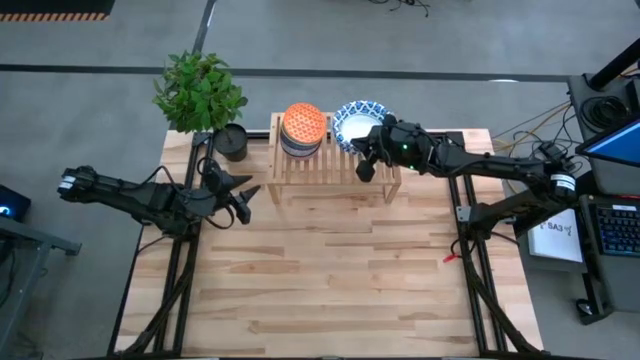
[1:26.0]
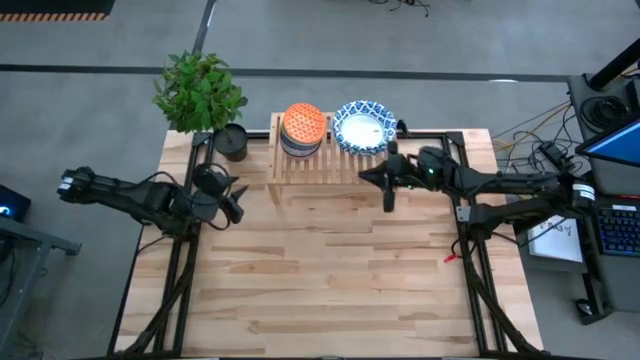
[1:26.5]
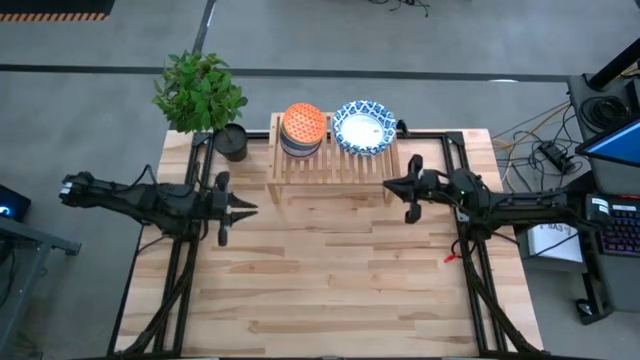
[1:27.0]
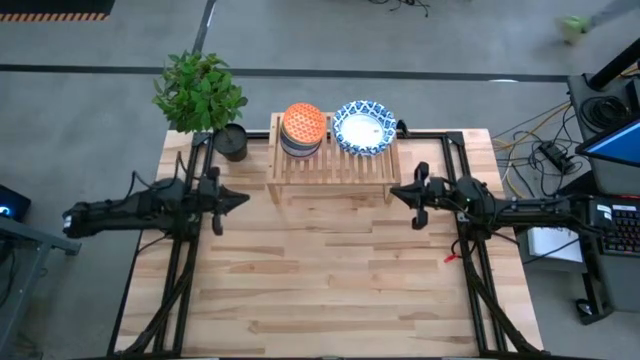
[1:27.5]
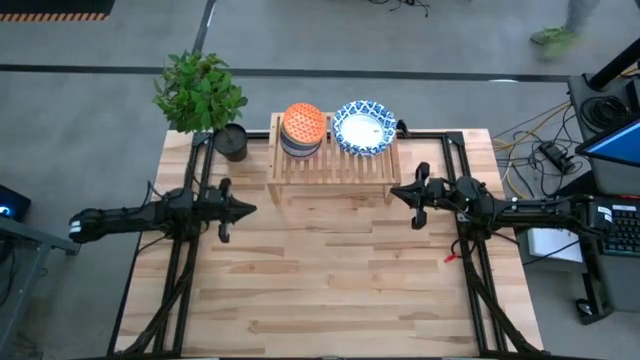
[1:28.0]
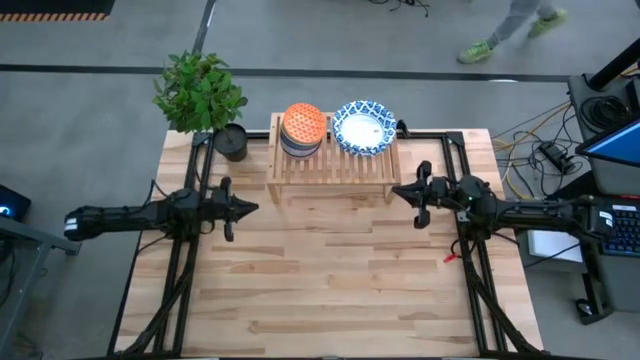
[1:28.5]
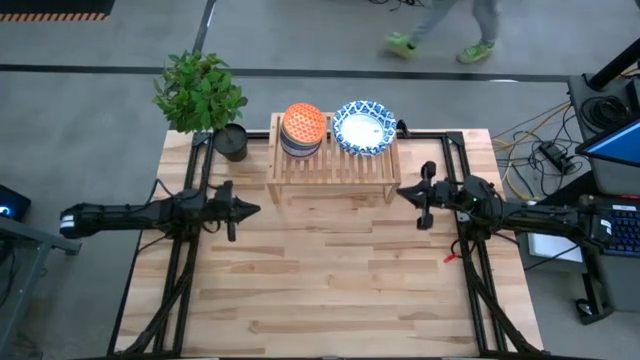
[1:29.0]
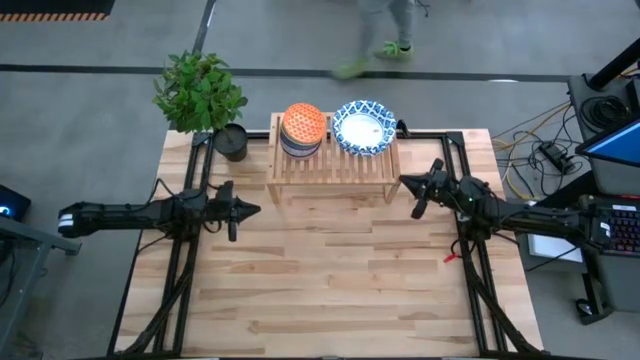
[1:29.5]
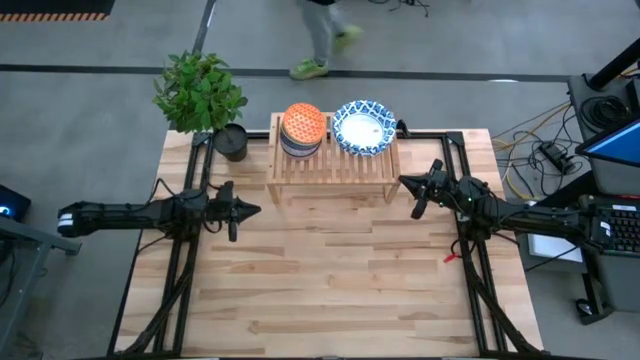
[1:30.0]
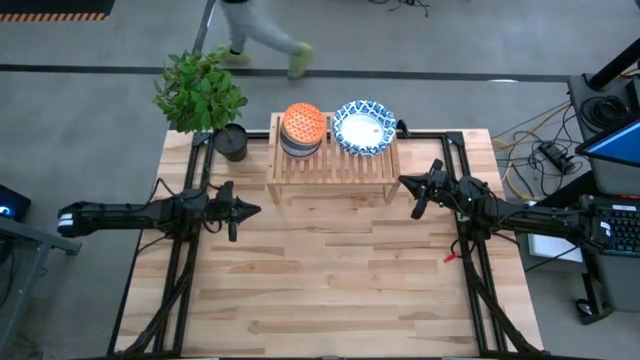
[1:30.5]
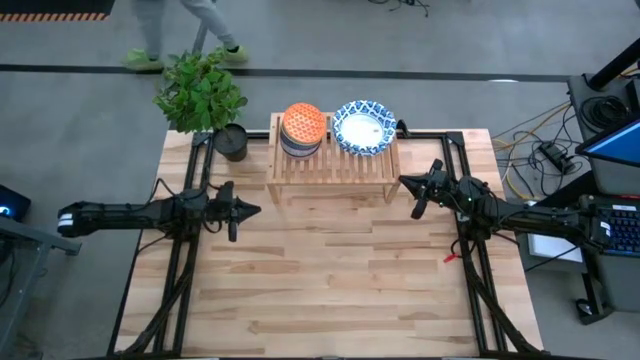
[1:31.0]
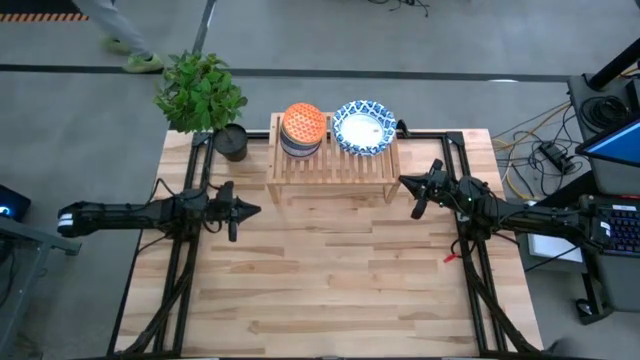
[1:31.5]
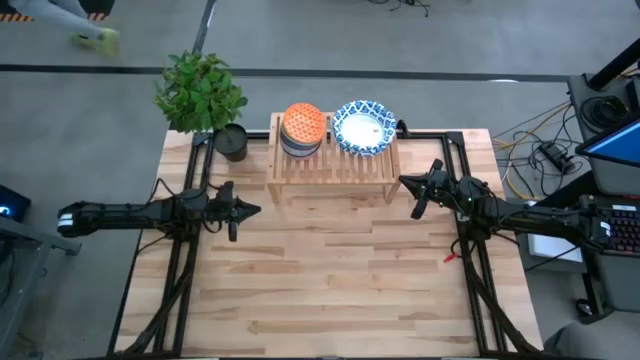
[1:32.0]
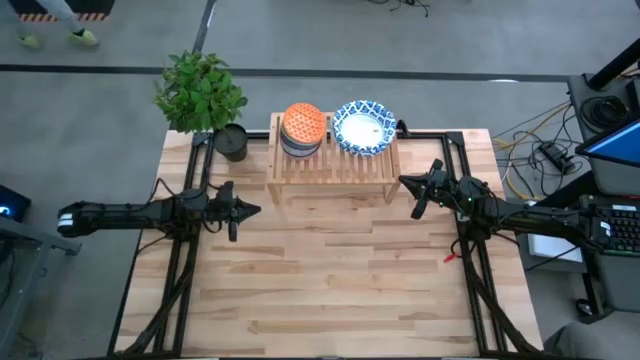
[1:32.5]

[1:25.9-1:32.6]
Task: Place and stack bowls onto a shelf
Return to Home Position

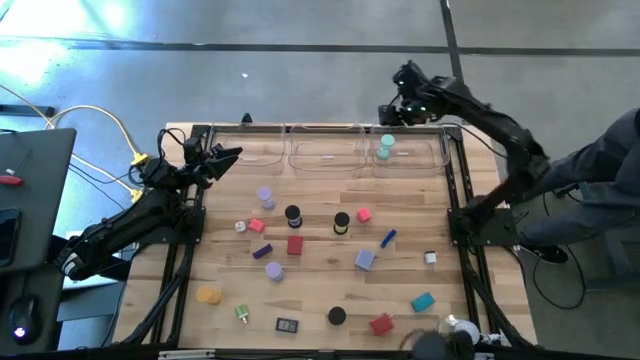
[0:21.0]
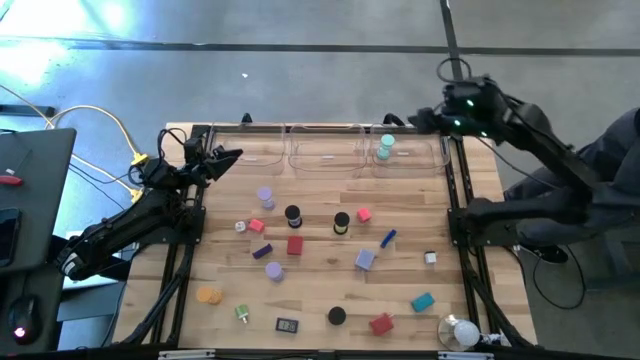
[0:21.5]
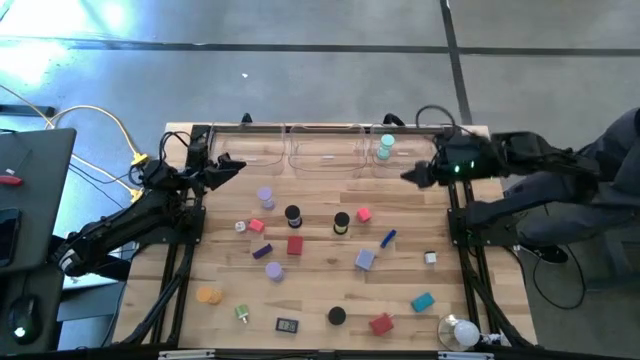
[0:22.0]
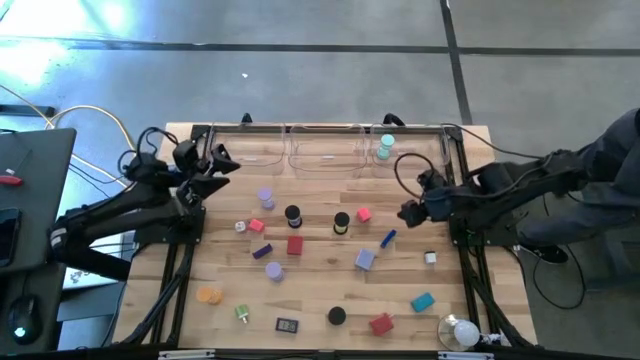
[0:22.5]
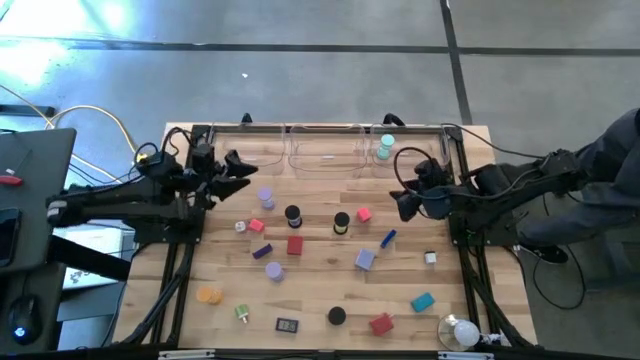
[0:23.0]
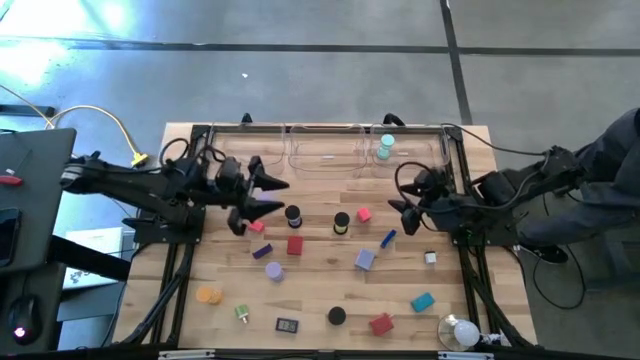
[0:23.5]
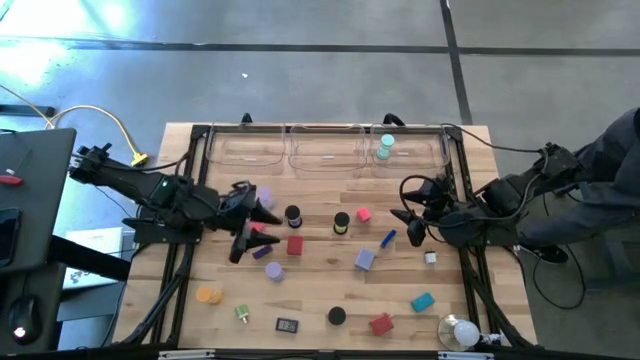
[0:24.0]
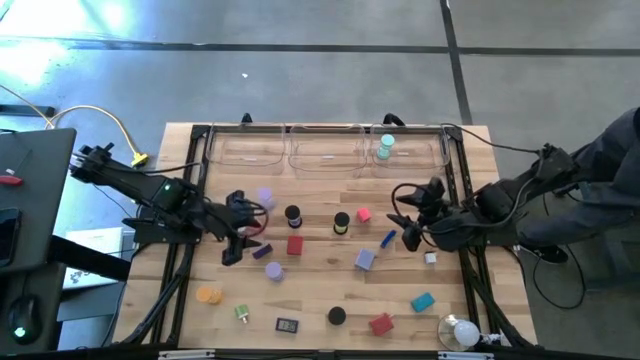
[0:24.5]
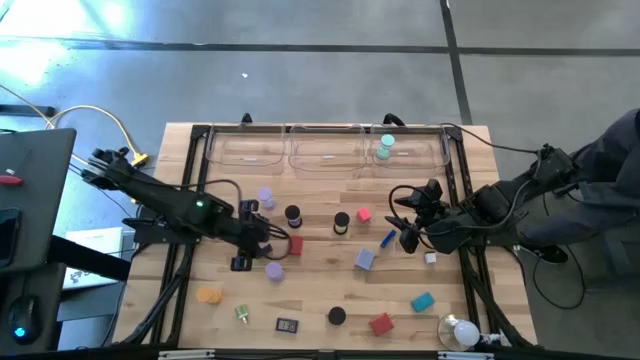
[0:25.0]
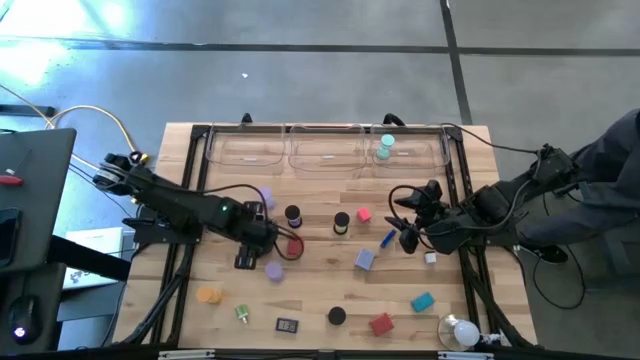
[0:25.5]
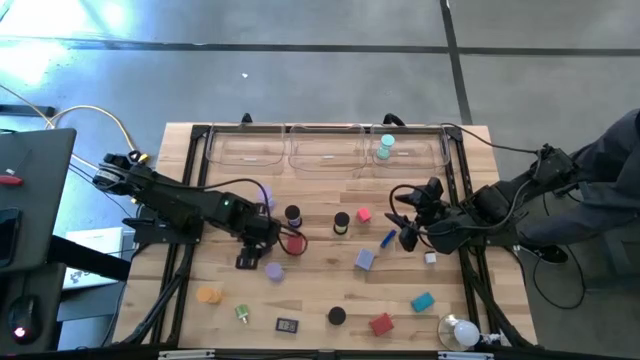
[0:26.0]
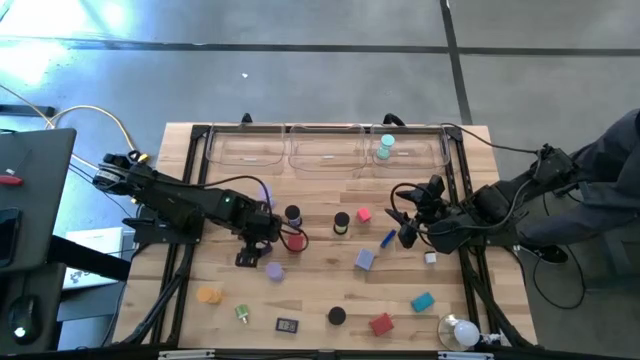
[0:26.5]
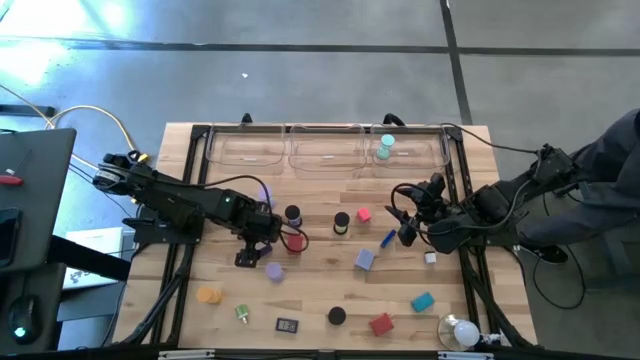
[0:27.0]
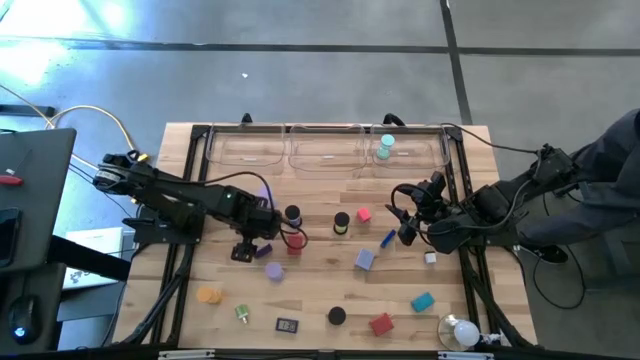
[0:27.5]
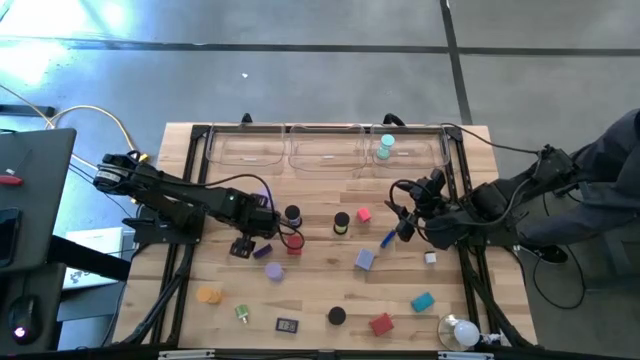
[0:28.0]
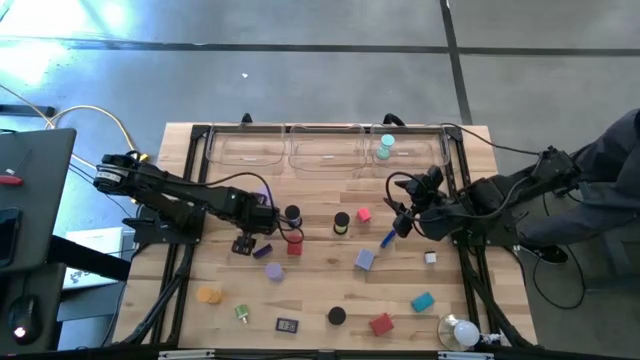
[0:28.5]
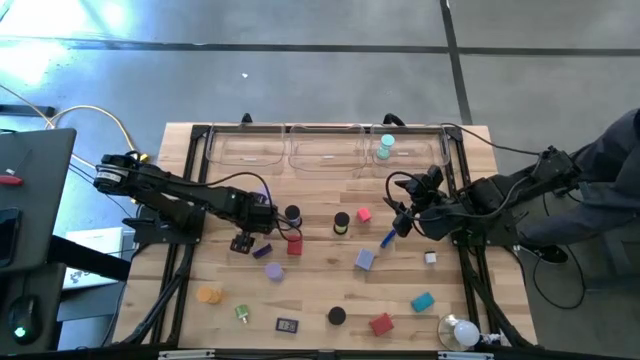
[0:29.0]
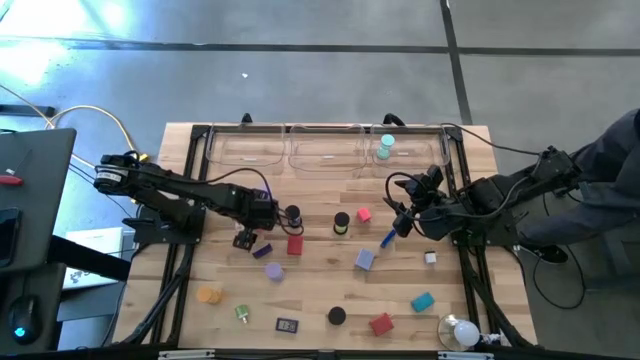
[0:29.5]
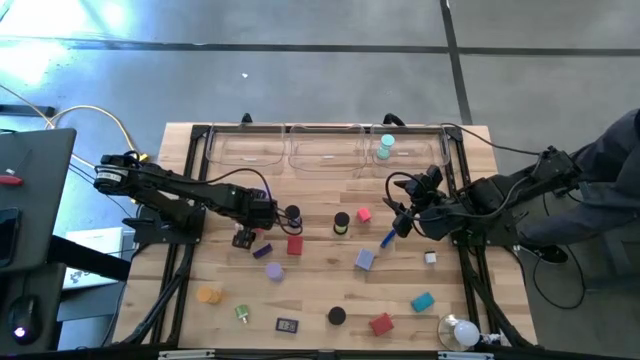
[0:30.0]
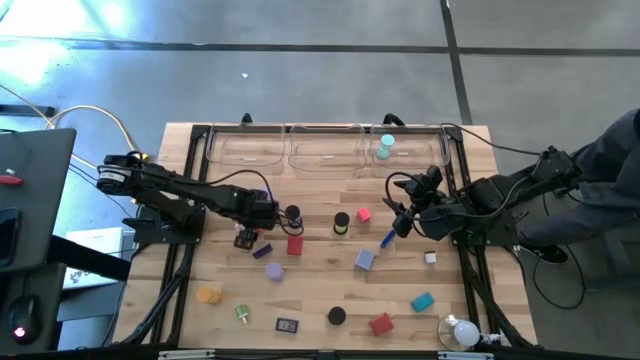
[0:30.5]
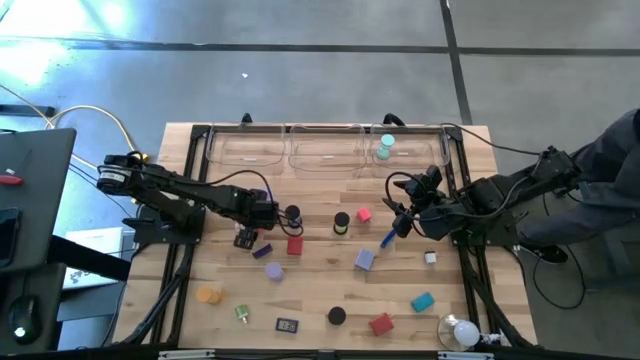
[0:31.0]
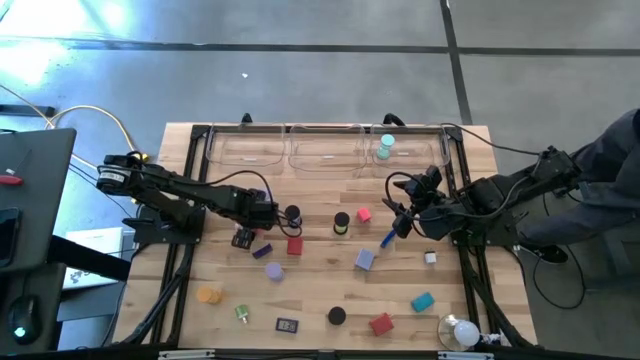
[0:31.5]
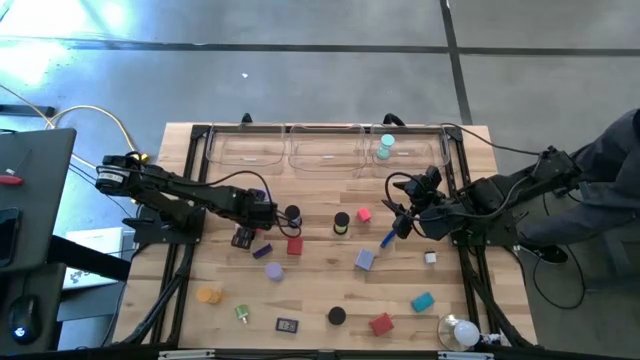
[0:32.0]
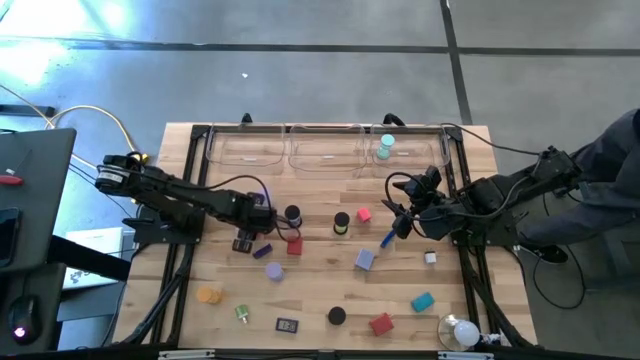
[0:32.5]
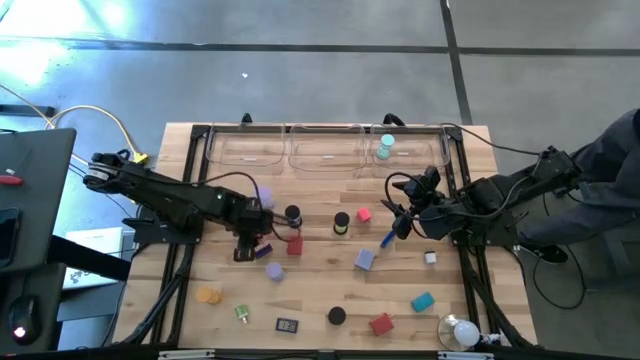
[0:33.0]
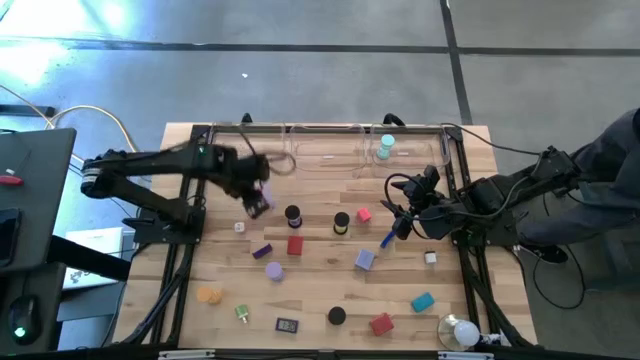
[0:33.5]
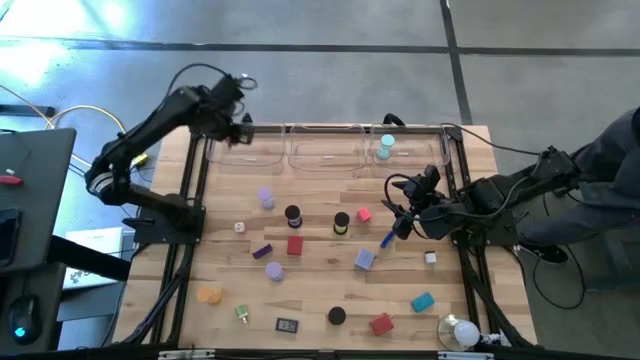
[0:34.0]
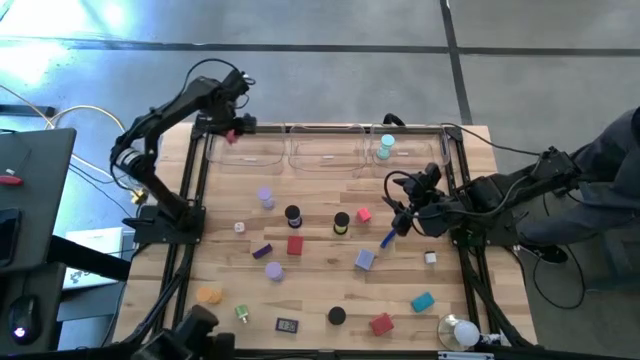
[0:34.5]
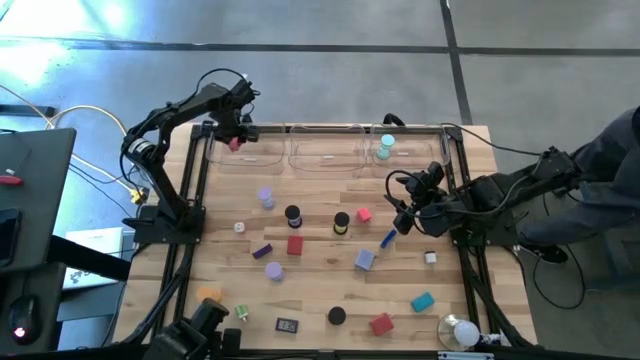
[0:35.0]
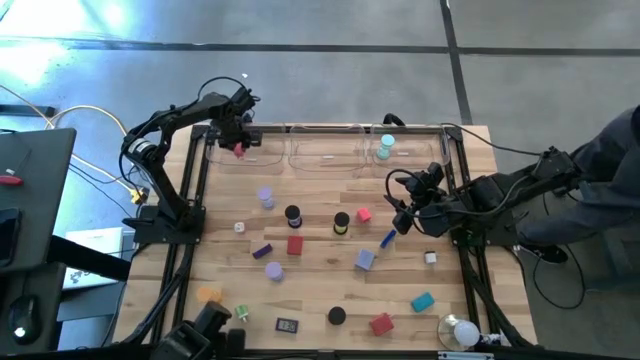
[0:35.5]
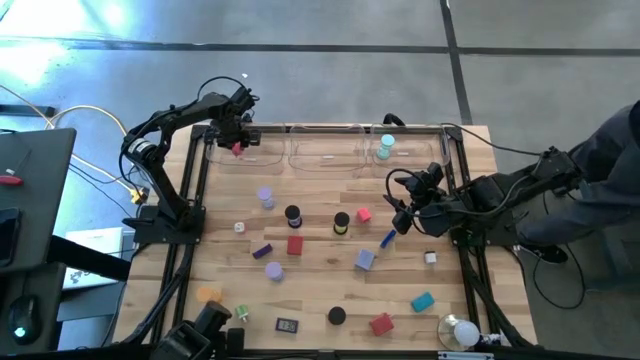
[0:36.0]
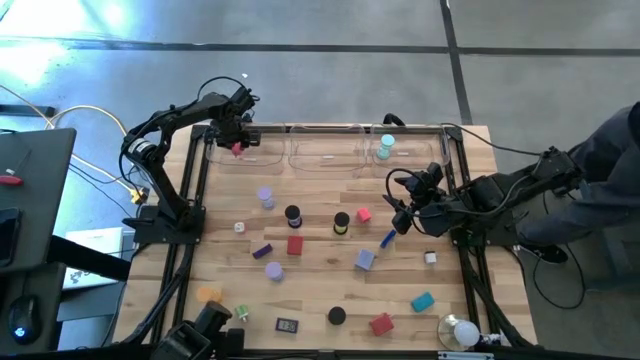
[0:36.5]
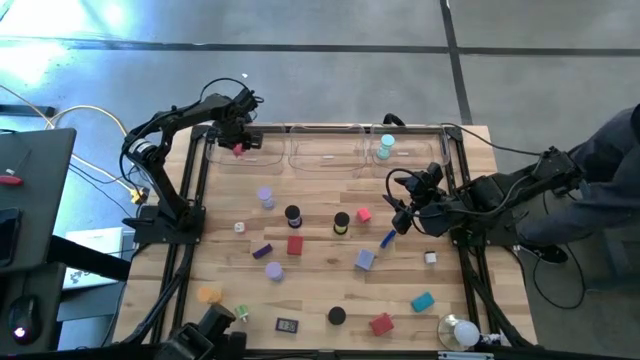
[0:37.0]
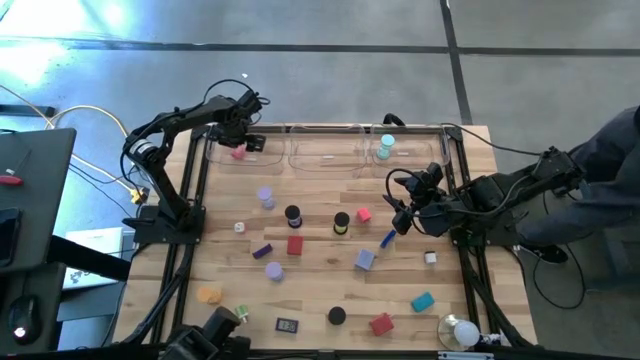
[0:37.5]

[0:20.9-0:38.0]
Task: Pick & Place Office items
Put the left pink charger adapter into the left transparent bin
